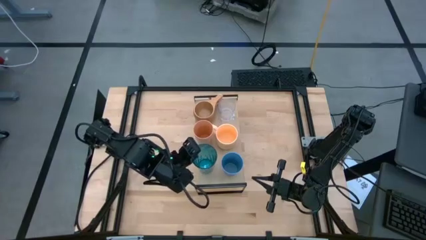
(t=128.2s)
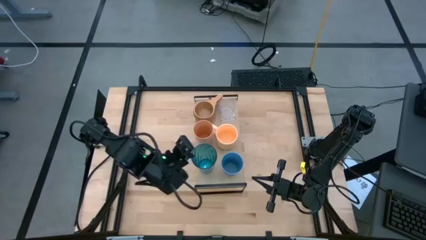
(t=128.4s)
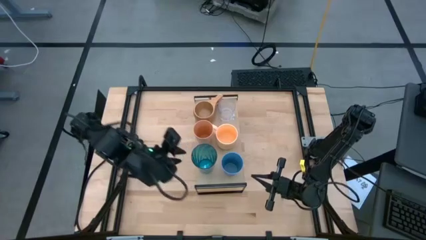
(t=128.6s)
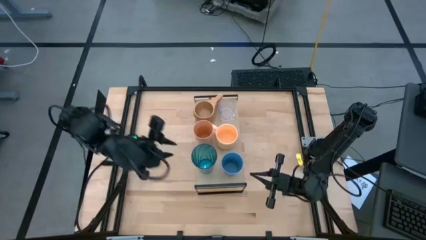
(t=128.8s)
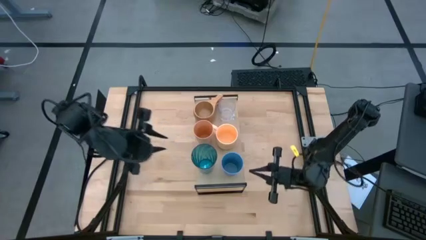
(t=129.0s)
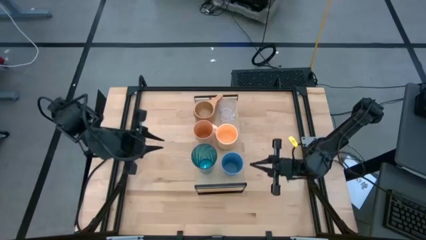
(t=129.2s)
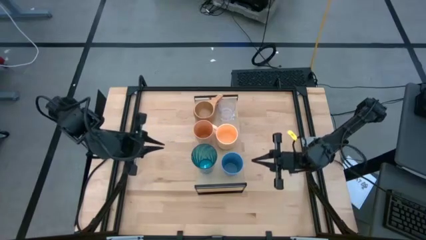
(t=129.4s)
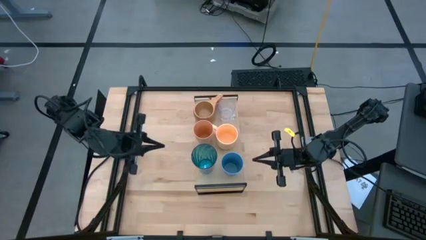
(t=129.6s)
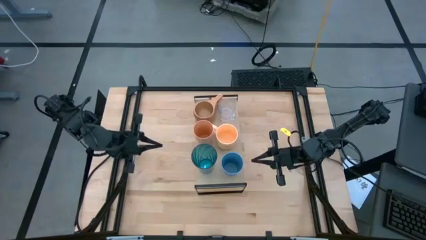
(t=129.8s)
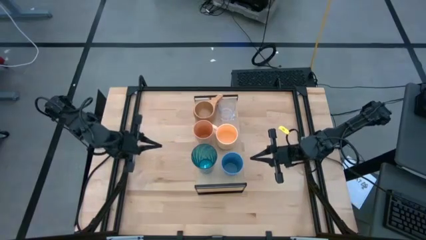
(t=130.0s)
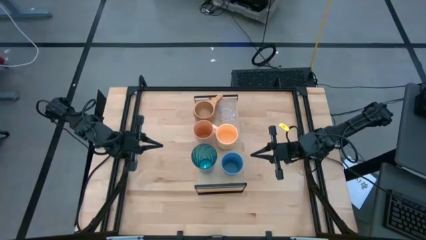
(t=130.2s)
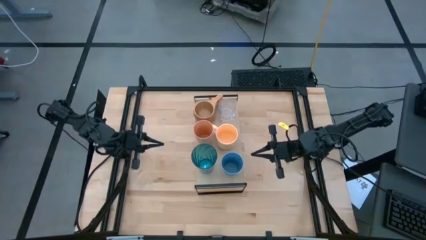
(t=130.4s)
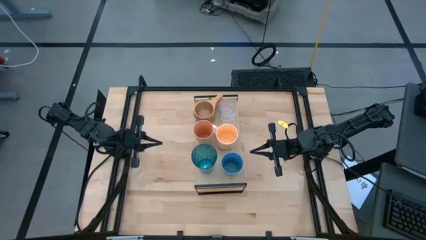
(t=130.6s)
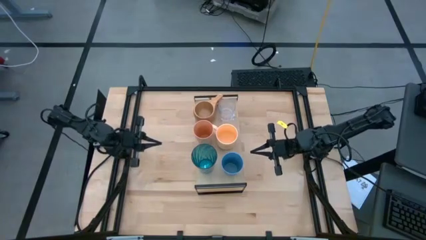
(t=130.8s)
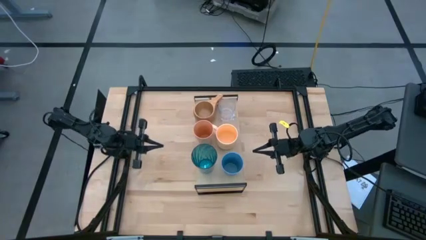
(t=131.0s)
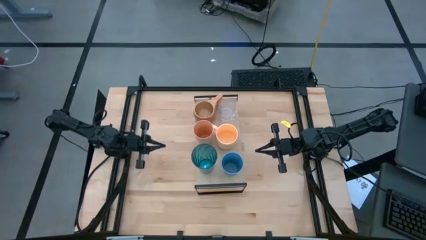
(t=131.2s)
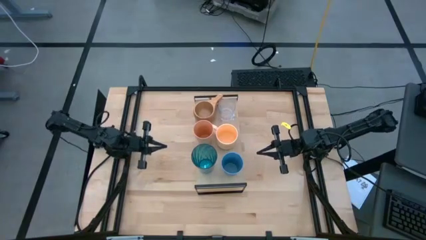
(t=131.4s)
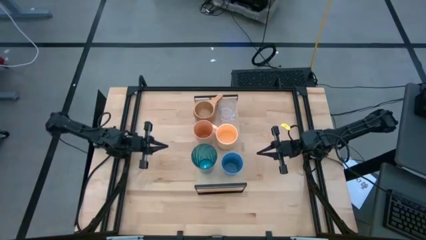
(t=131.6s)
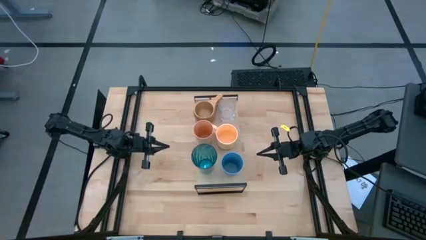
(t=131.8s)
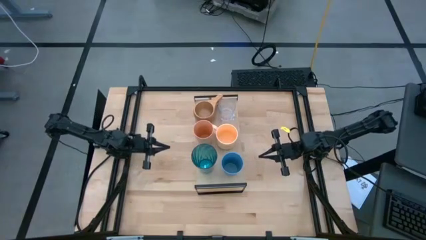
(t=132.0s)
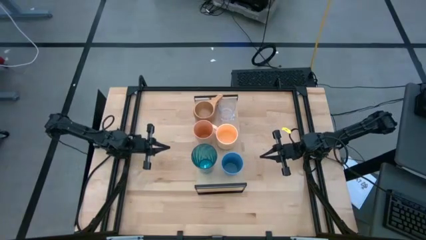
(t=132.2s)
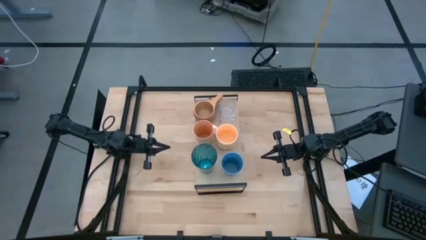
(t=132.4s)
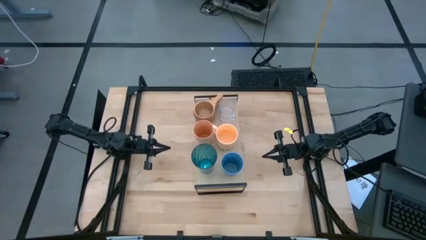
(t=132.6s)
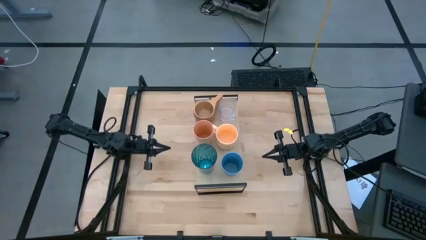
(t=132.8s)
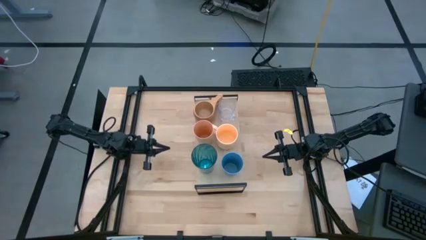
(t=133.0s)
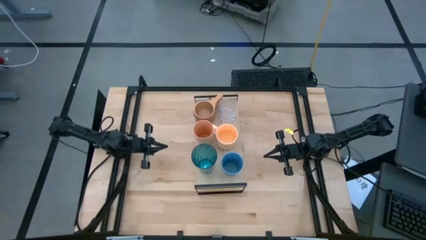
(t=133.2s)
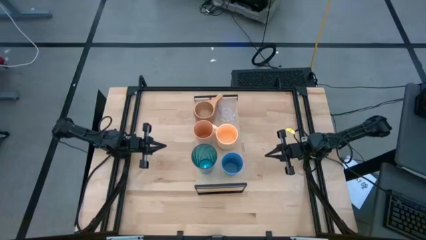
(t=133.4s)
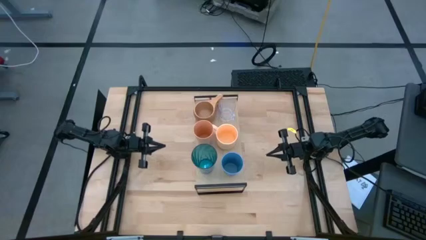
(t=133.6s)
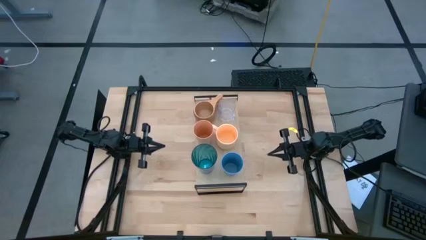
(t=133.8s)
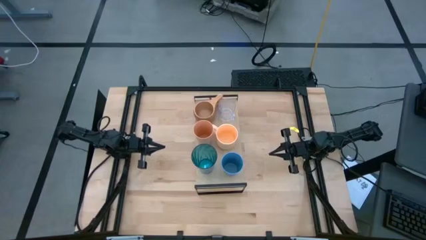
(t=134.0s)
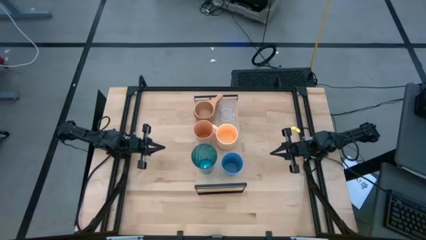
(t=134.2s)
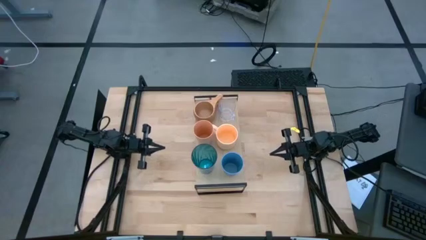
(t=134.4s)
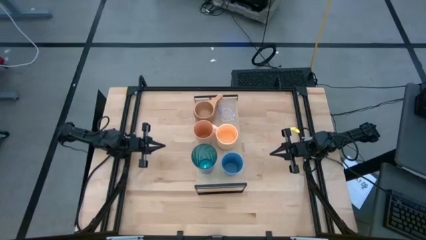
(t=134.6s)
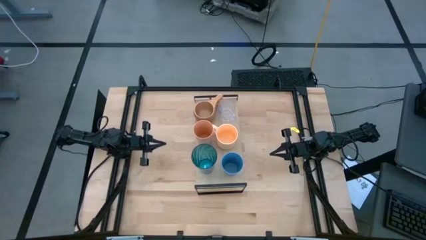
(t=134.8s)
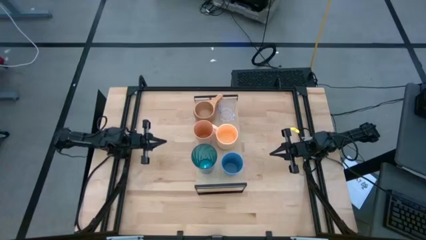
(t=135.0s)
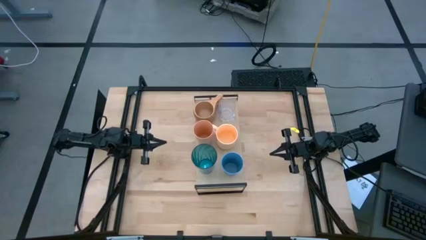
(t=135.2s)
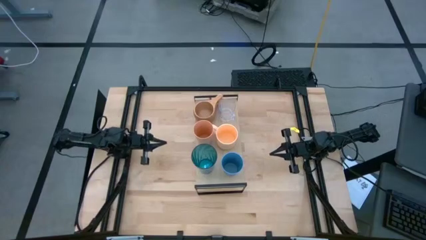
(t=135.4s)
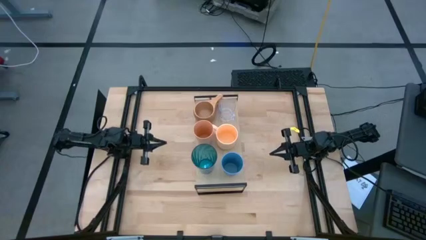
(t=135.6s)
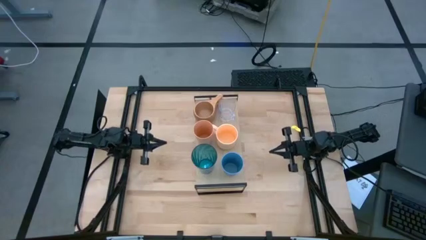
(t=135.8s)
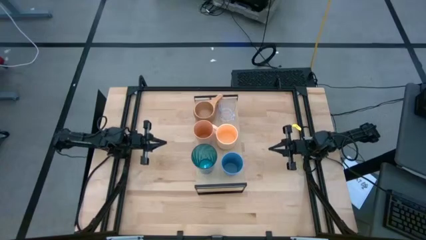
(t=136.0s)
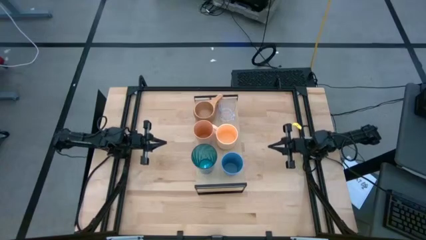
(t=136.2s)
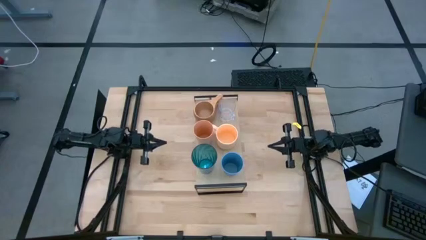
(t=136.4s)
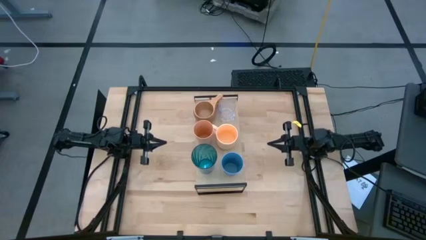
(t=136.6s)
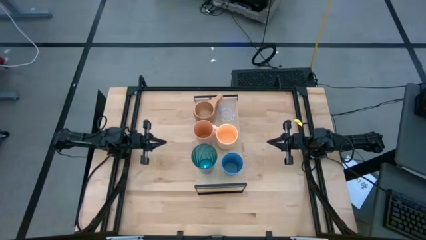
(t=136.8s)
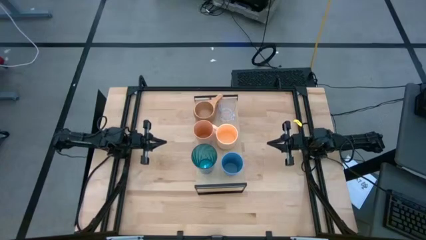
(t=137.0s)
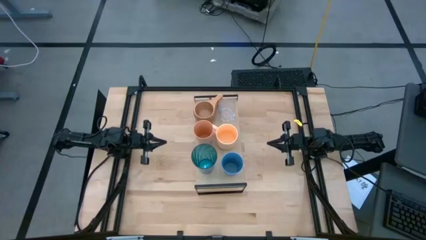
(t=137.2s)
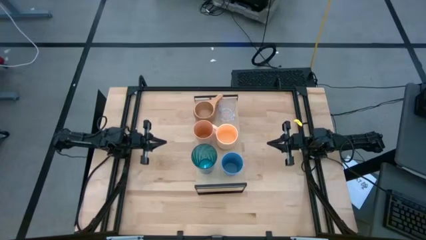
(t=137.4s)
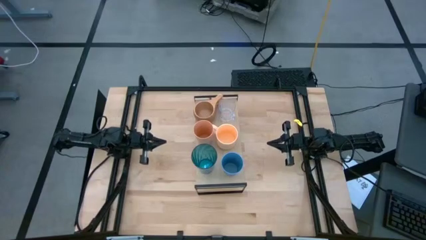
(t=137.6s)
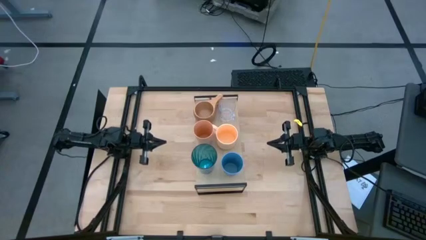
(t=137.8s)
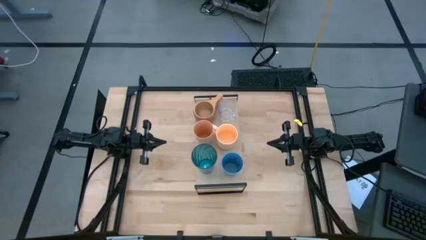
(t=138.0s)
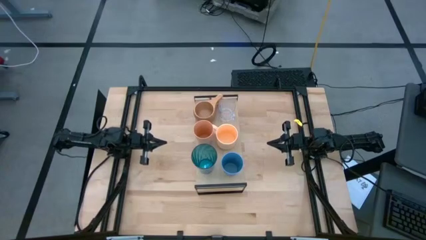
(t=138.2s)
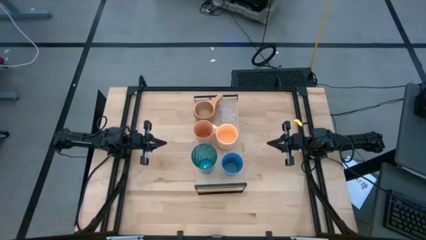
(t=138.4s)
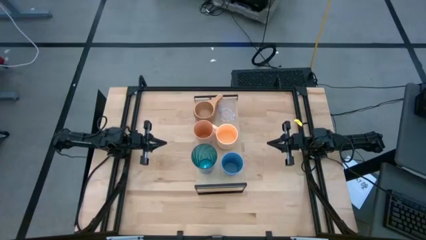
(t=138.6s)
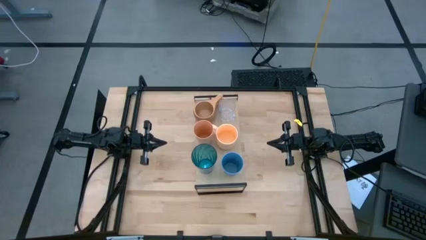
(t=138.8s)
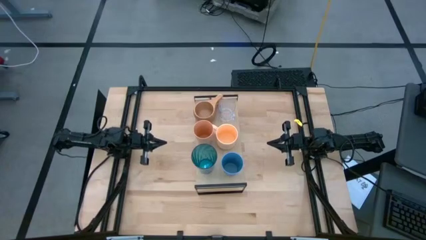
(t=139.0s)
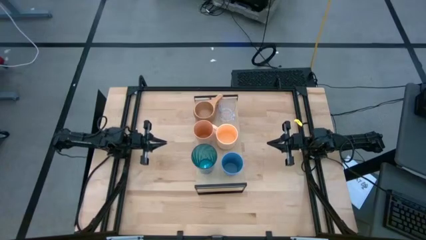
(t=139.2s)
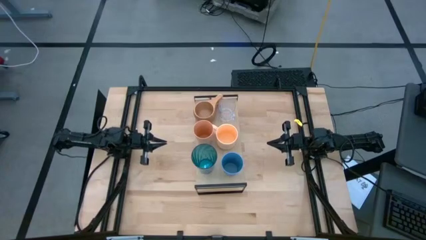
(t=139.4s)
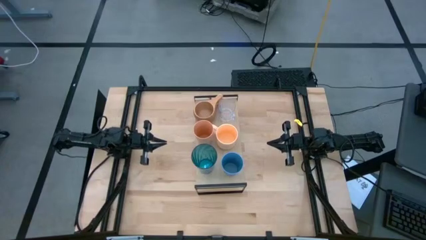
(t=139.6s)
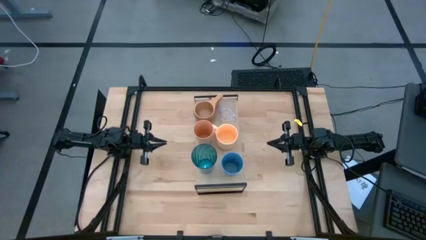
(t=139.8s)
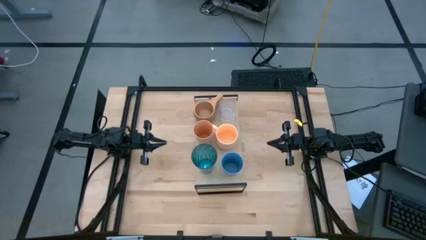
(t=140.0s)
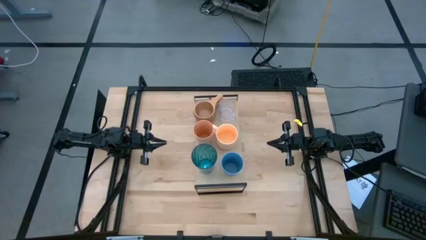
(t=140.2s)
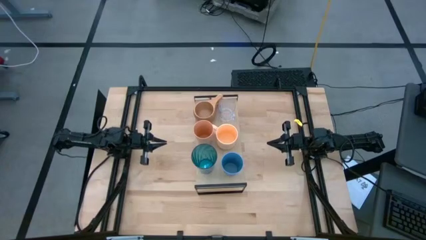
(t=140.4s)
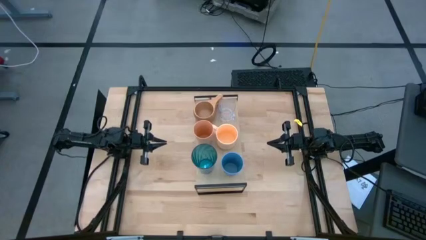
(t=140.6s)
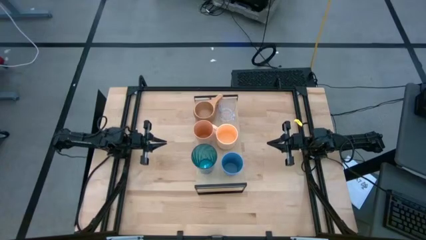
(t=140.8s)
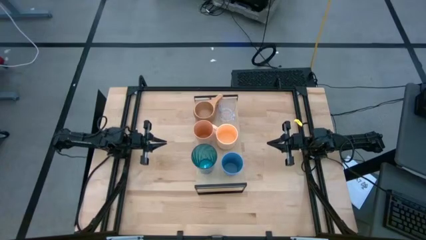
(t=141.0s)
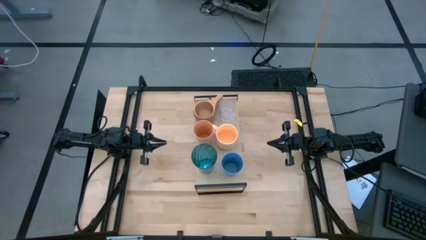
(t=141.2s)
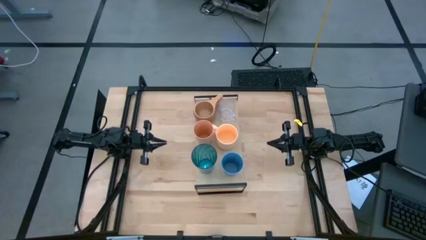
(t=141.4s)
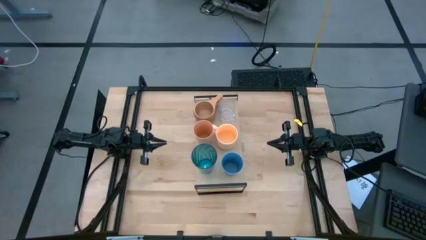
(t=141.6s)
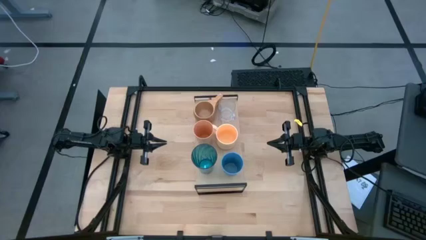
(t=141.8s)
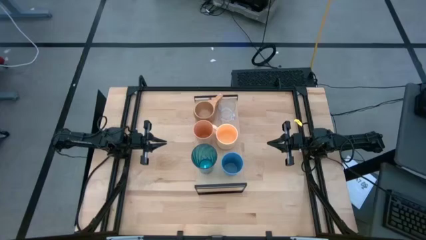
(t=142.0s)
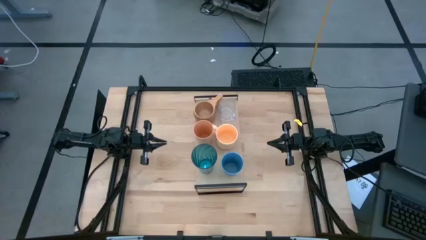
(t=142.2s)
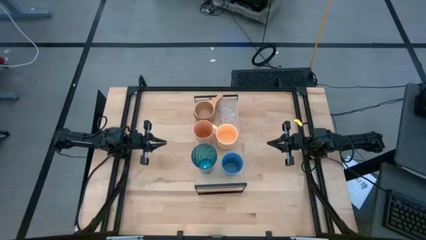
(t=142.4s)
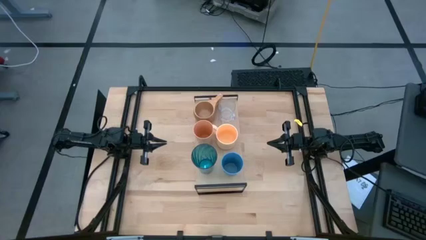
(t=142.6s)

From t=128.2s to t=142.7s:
Task: Stack small to large cups/mugs on shelf
Return to Home Position
